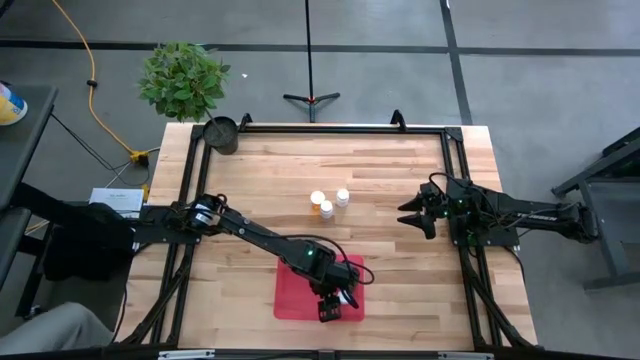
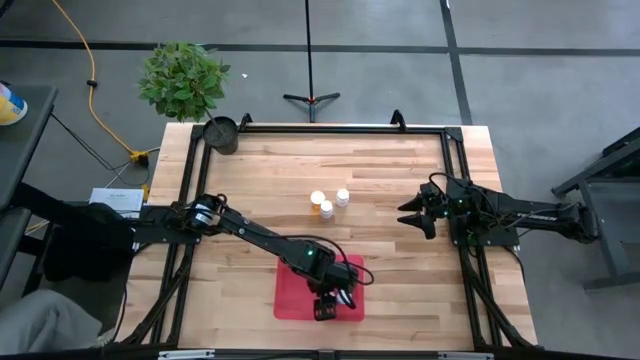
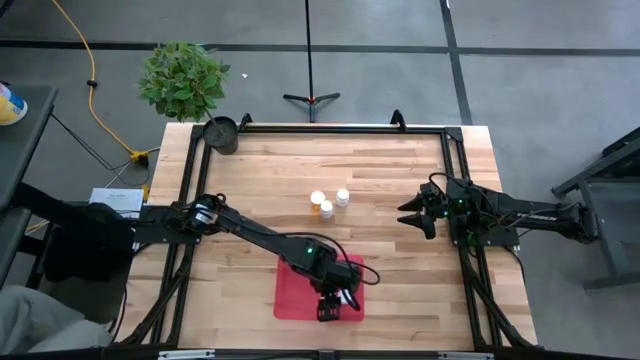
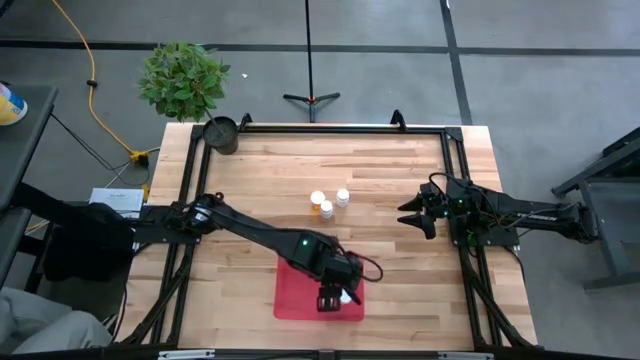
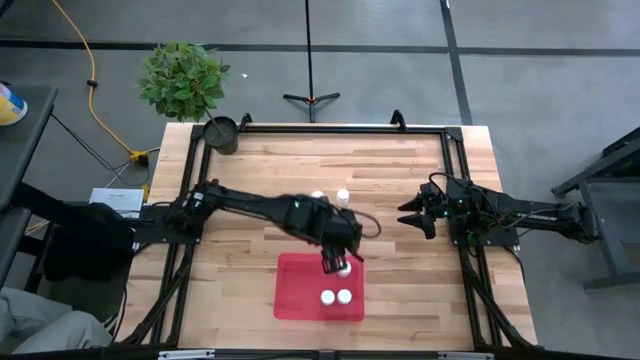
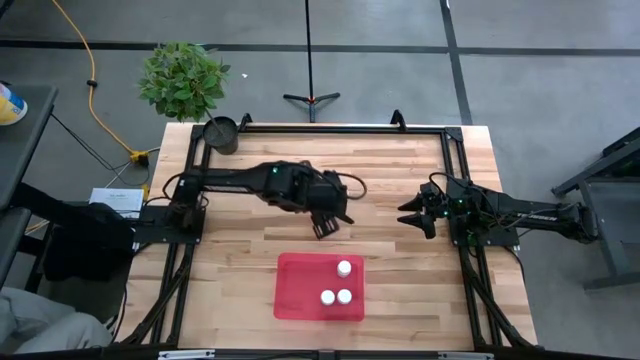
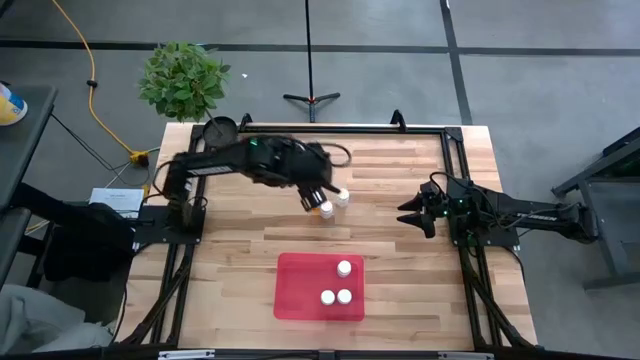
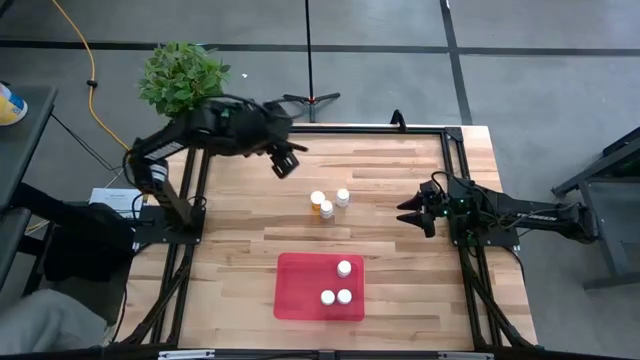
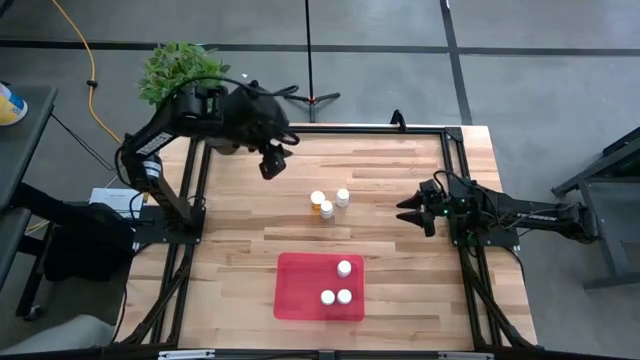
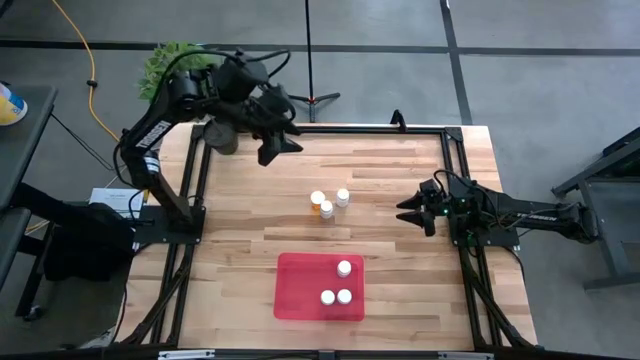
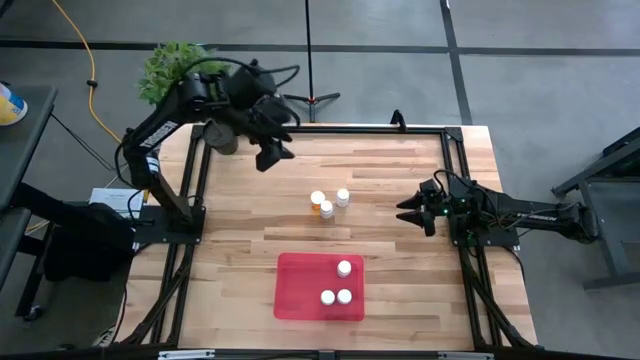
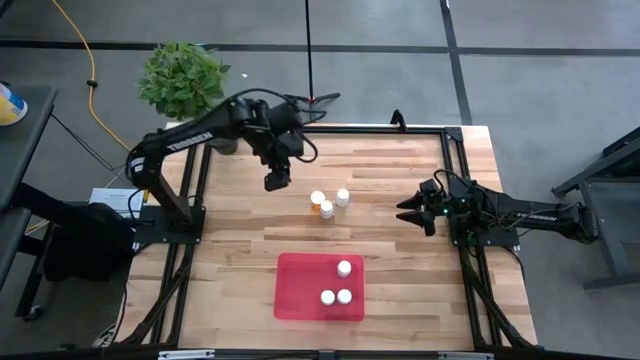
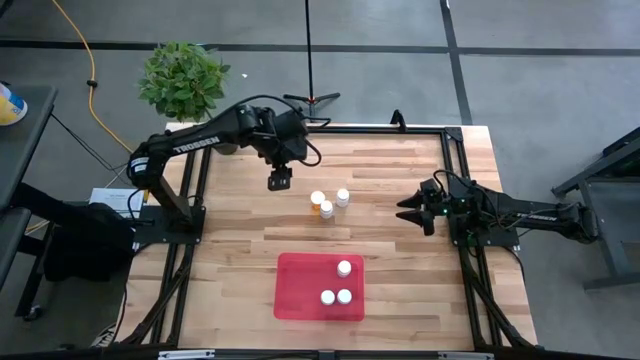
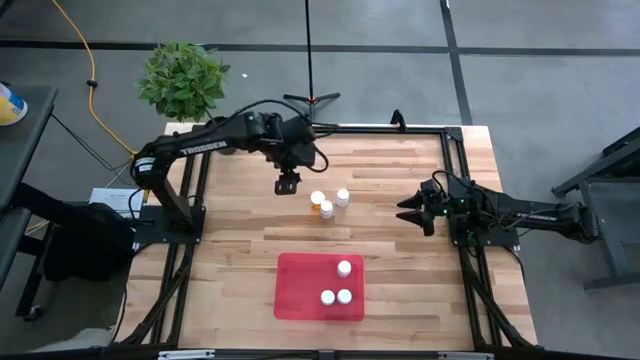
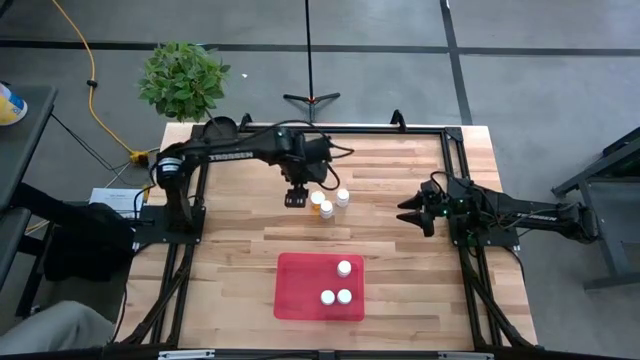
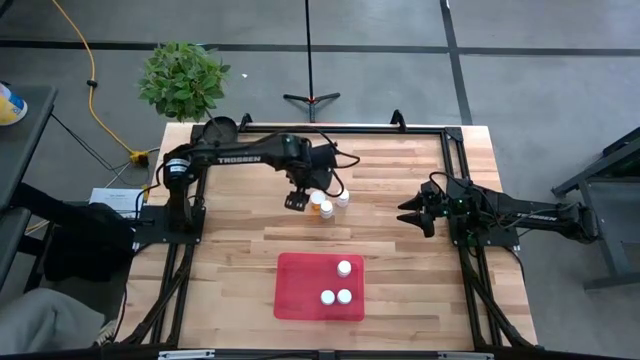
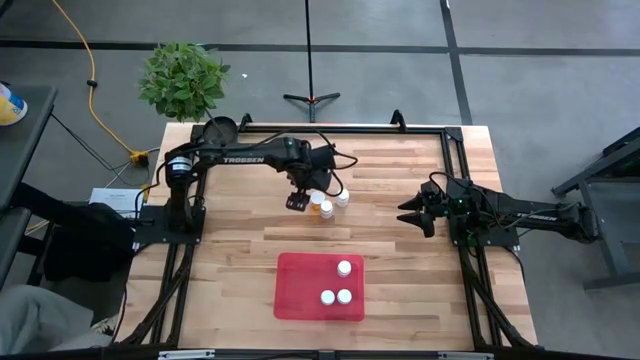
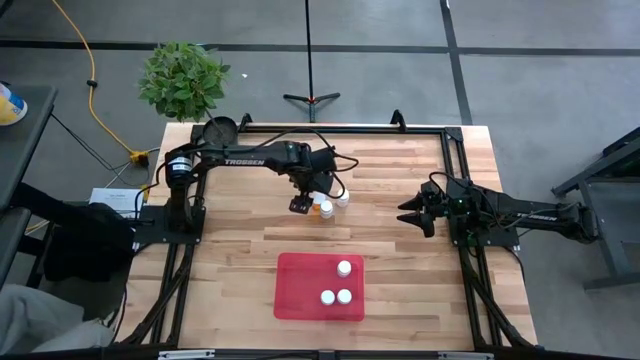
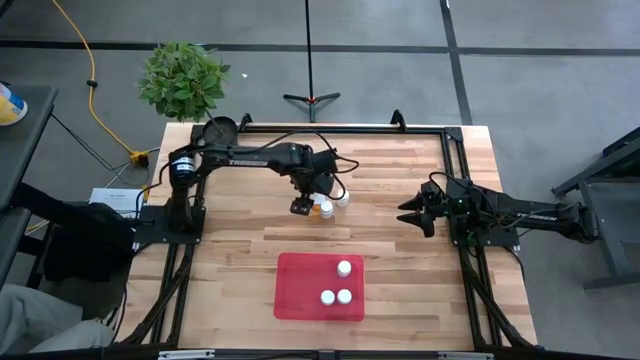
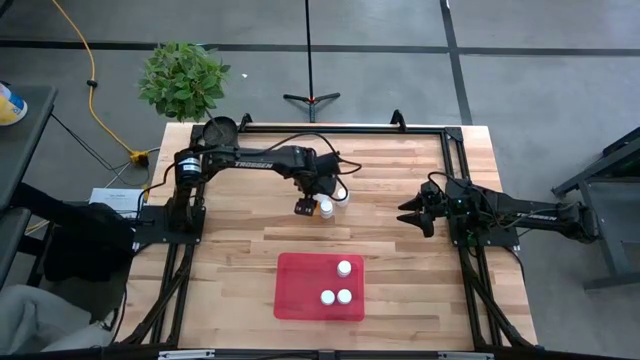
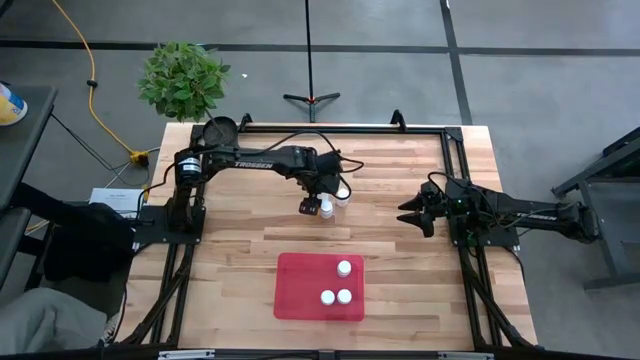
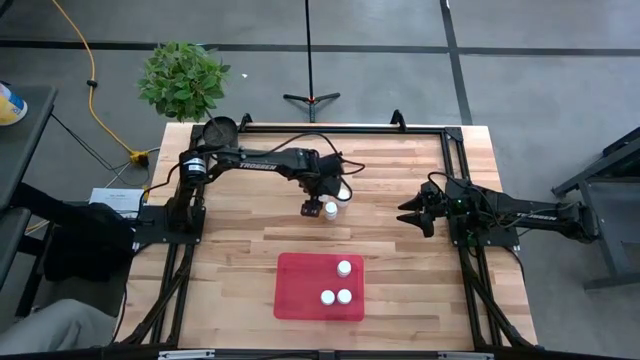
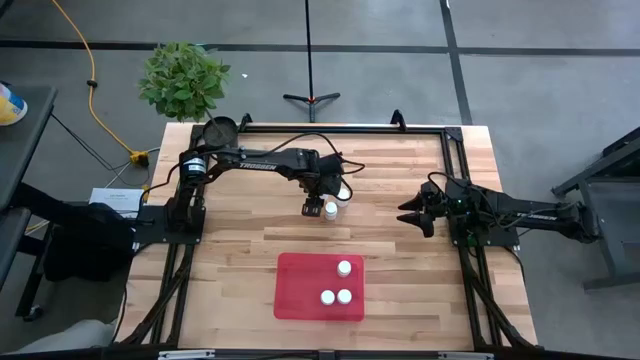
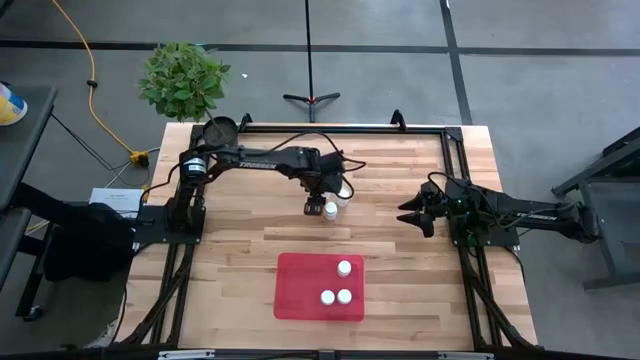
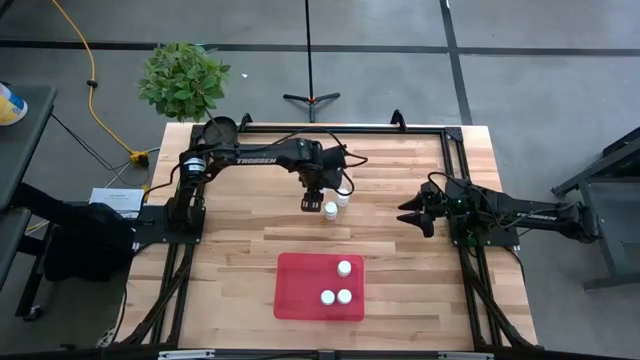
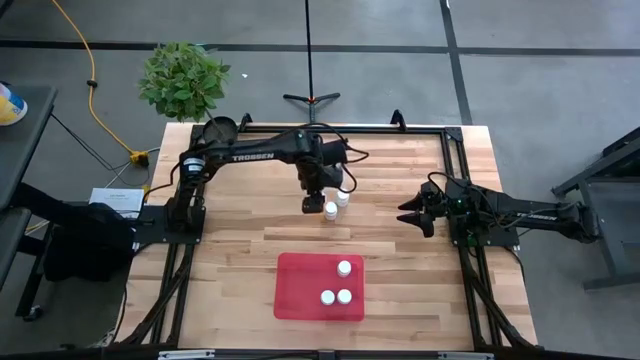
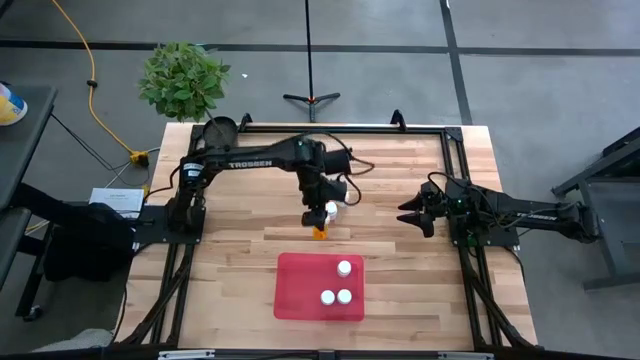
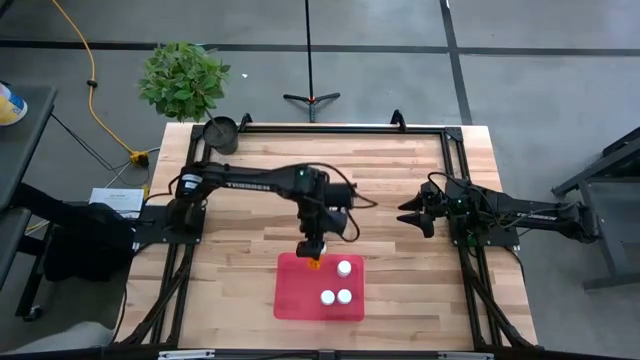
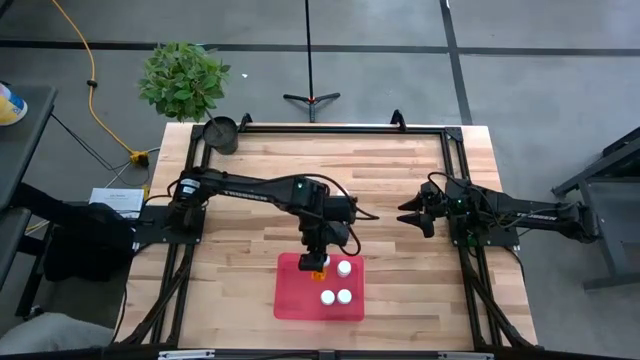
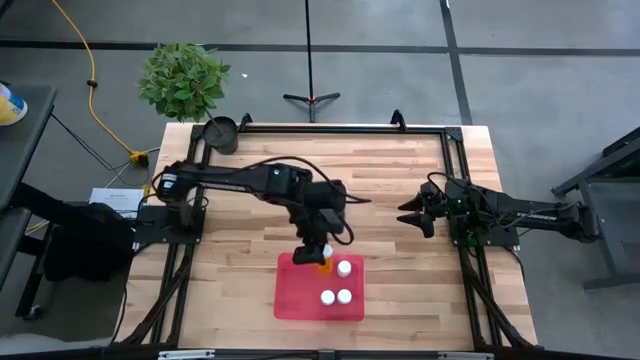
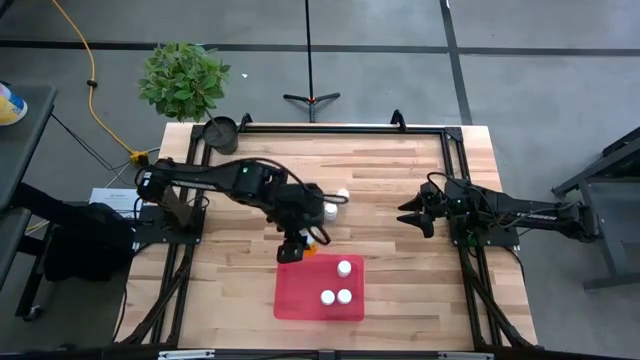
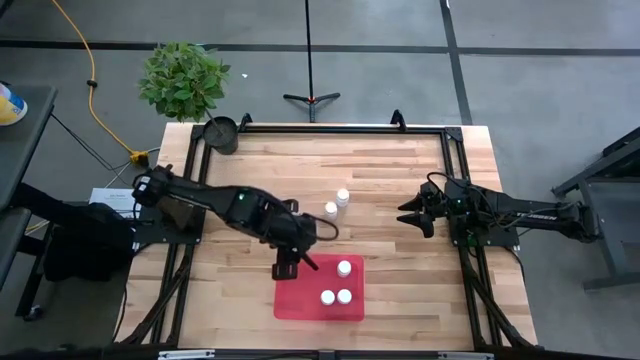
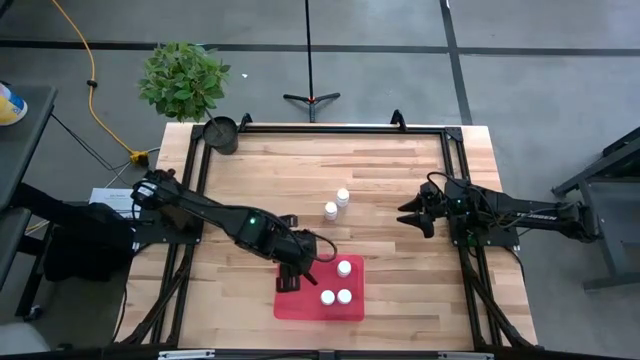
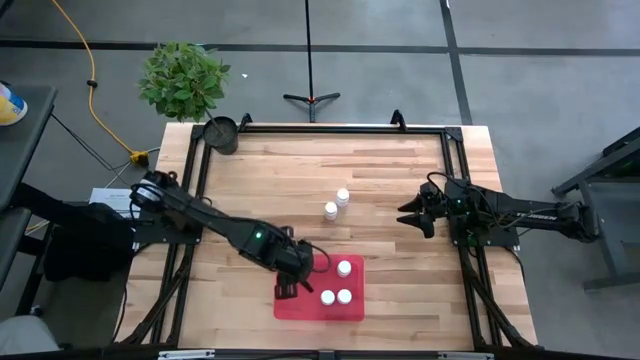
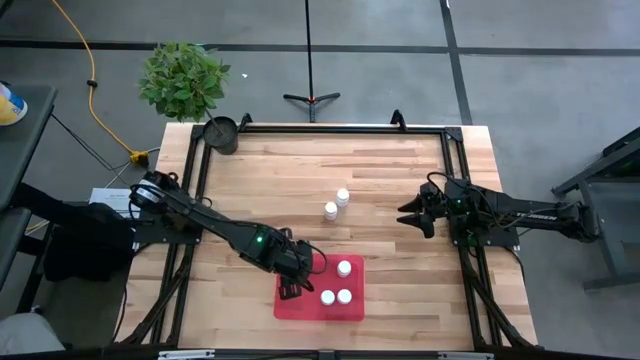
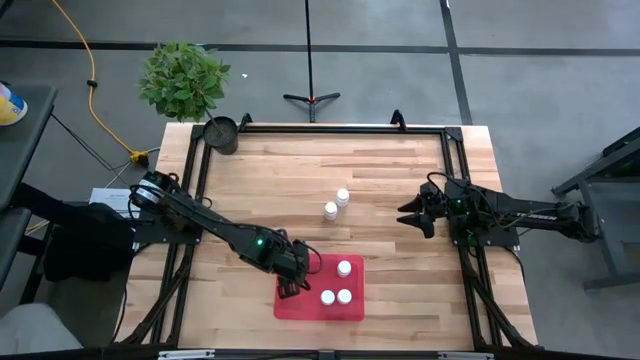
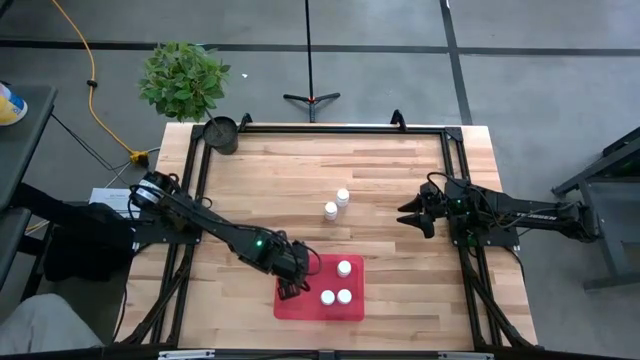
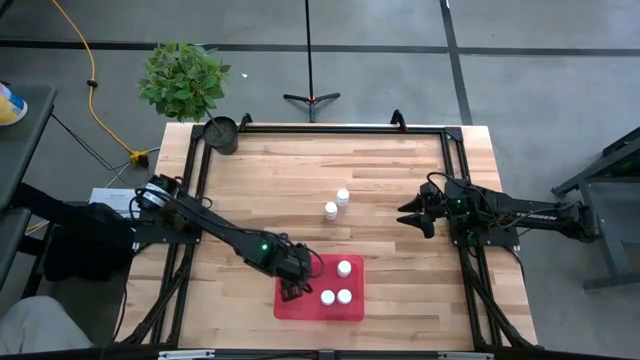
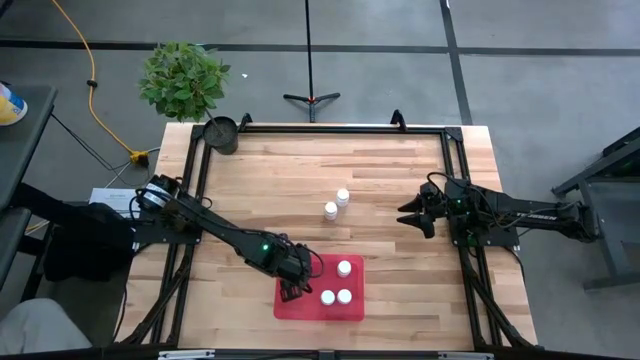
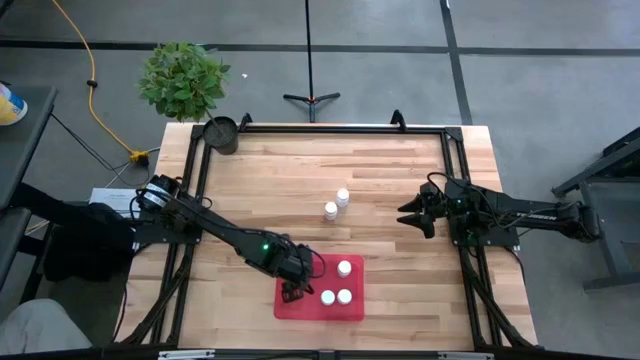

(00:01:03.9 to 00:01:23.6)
Task: Pick and place pill bottles into a basket
Put the orange pill bottle into the red bin
